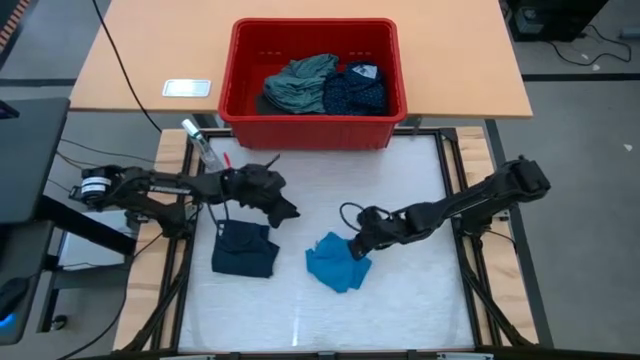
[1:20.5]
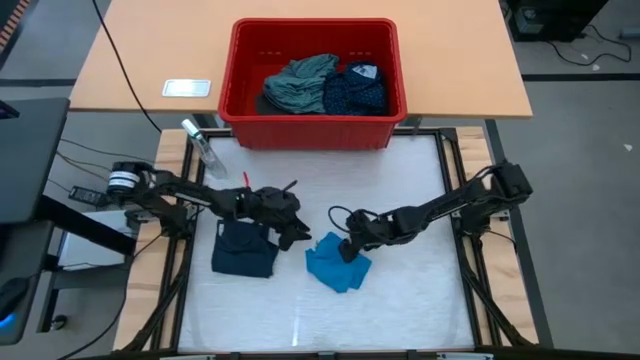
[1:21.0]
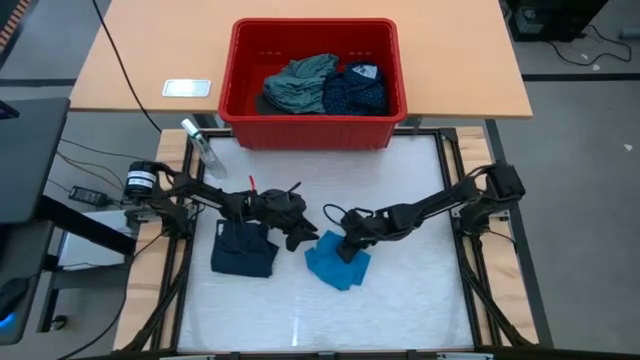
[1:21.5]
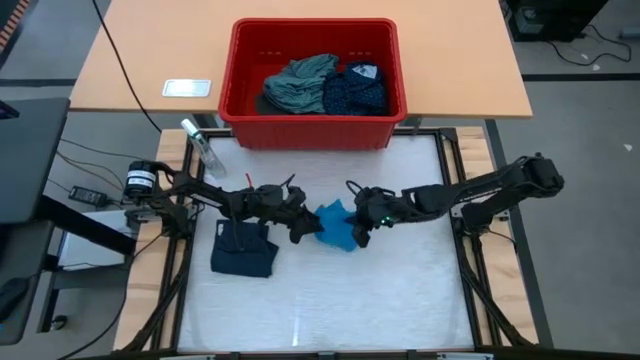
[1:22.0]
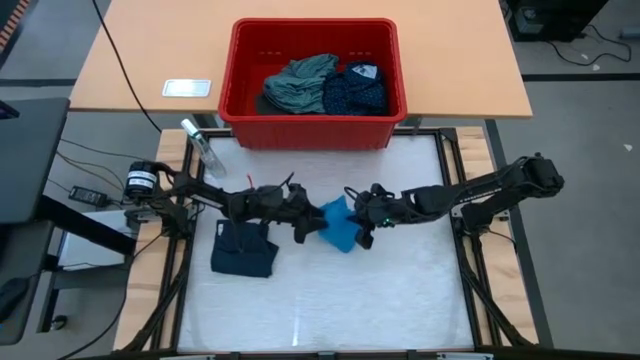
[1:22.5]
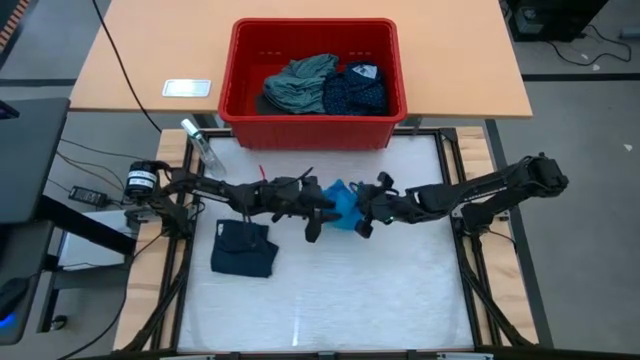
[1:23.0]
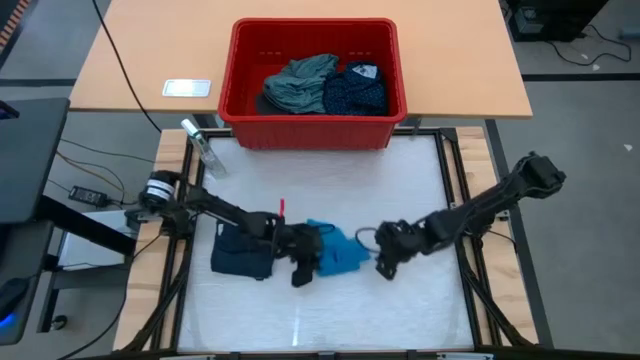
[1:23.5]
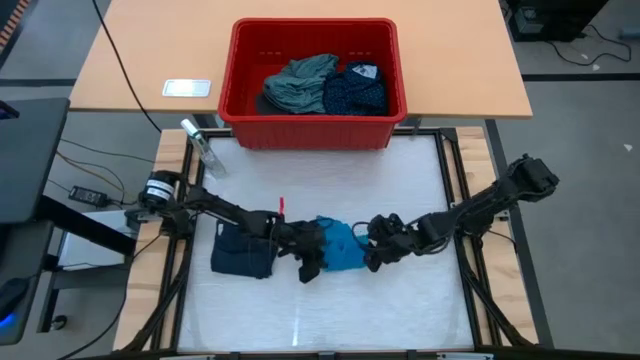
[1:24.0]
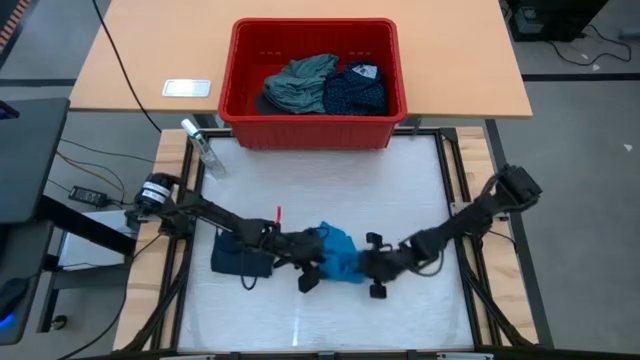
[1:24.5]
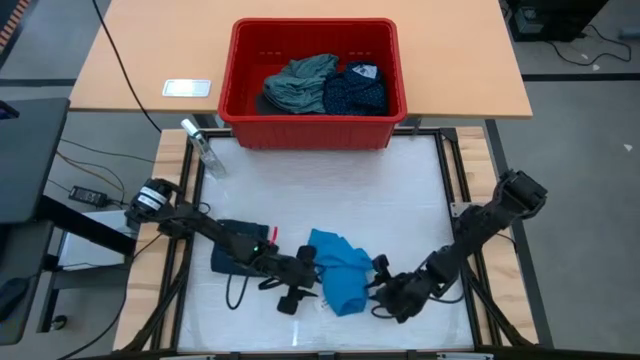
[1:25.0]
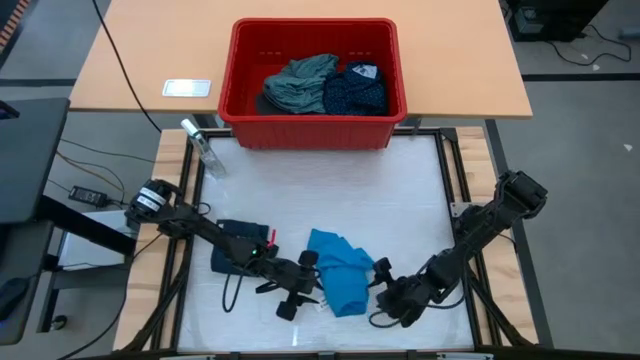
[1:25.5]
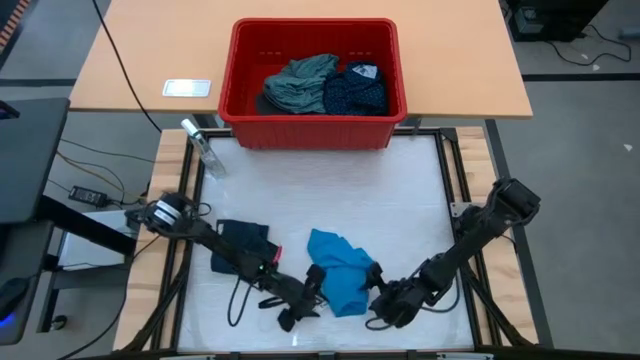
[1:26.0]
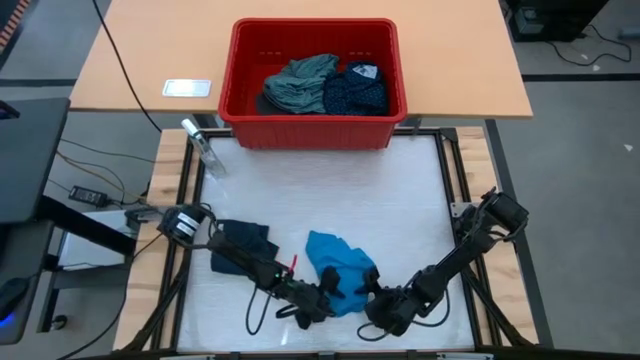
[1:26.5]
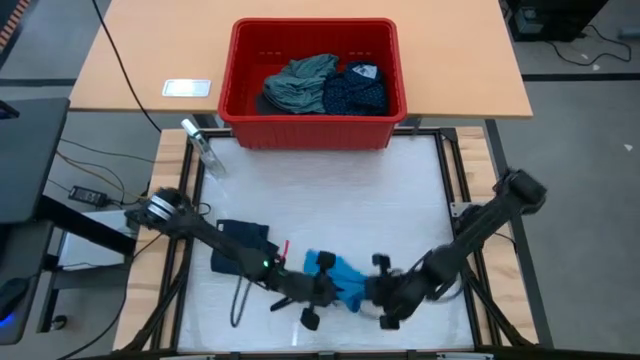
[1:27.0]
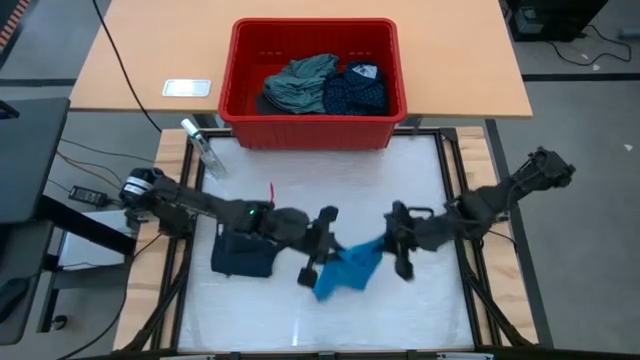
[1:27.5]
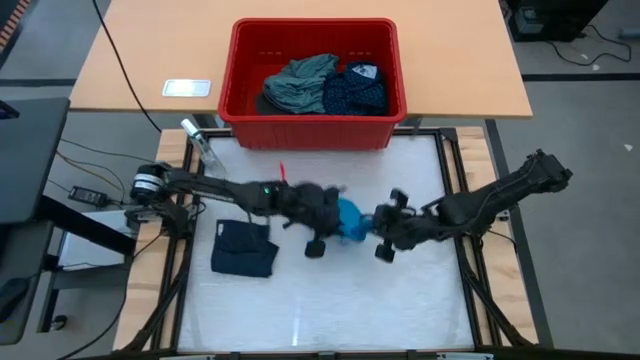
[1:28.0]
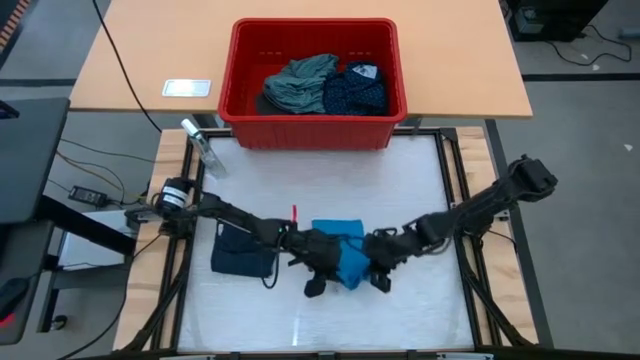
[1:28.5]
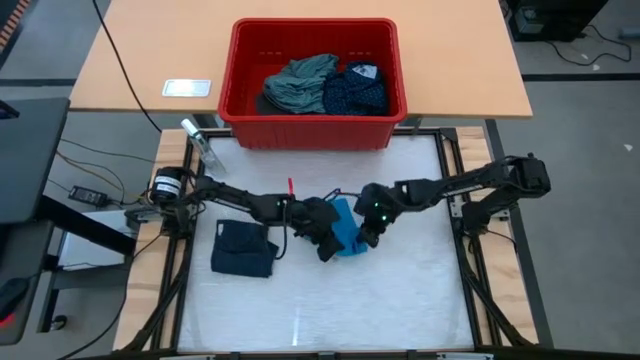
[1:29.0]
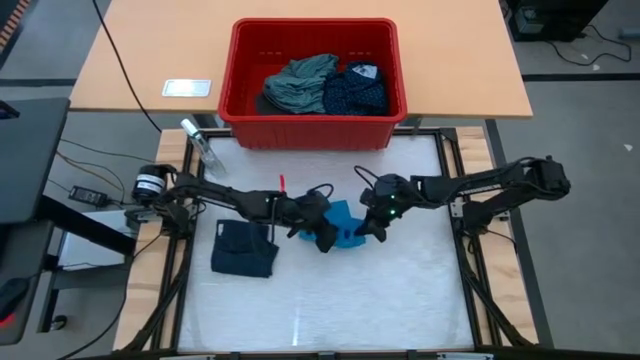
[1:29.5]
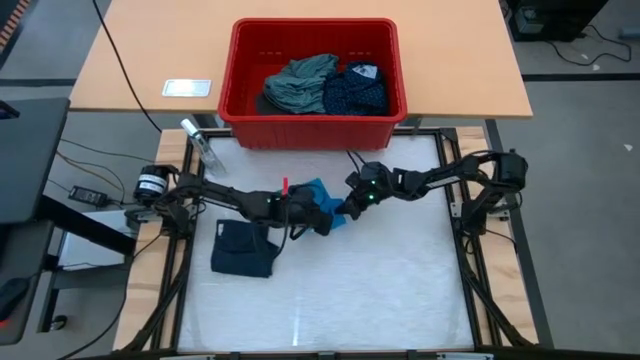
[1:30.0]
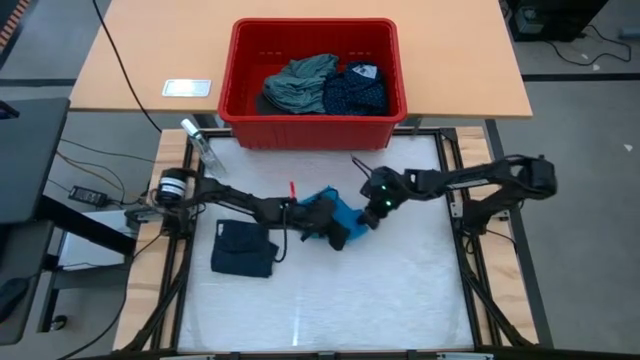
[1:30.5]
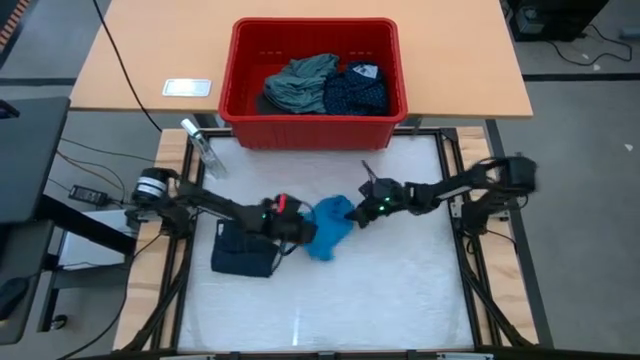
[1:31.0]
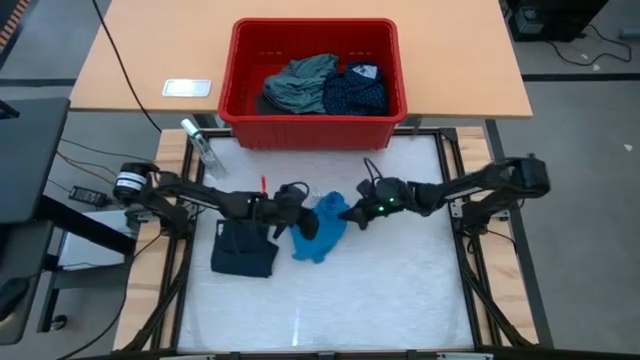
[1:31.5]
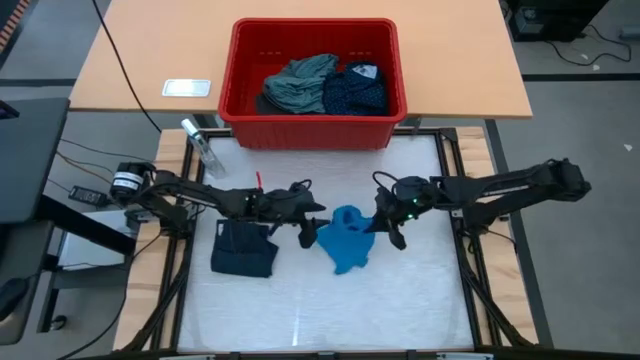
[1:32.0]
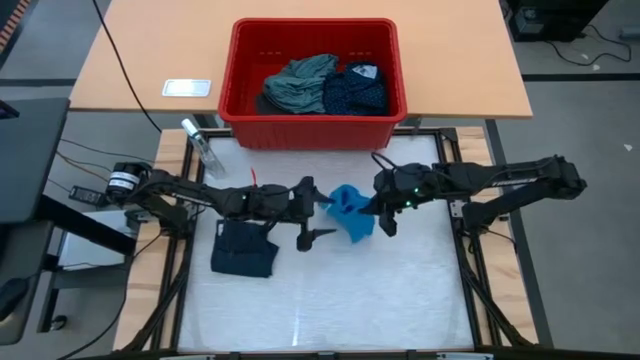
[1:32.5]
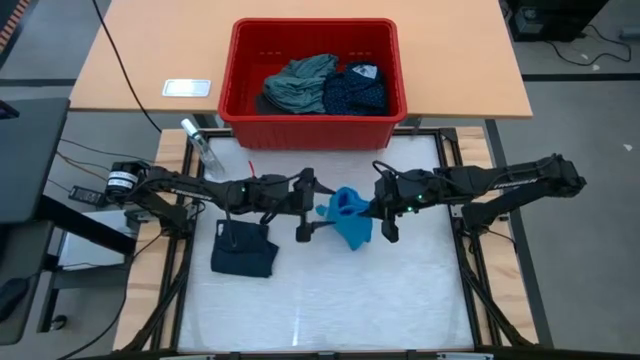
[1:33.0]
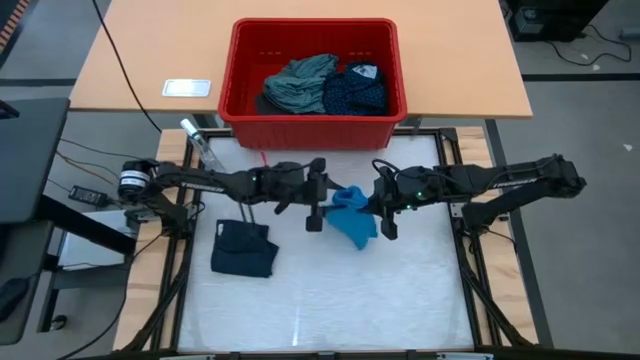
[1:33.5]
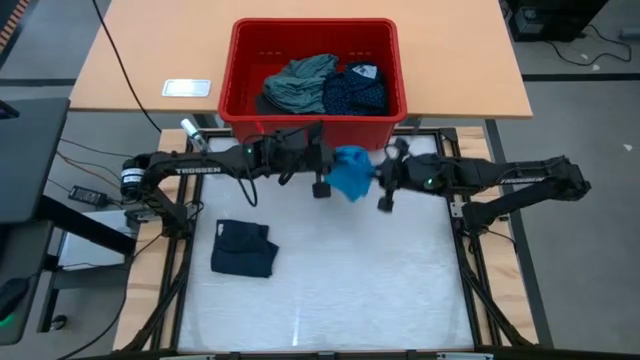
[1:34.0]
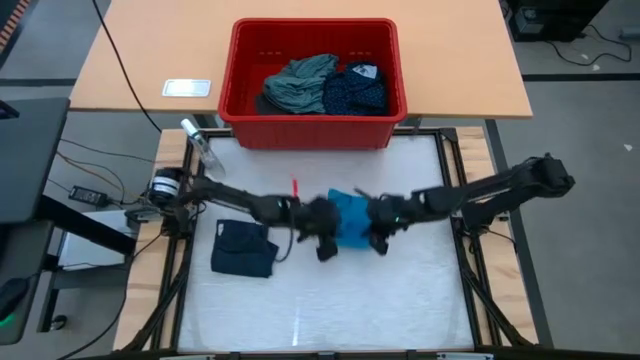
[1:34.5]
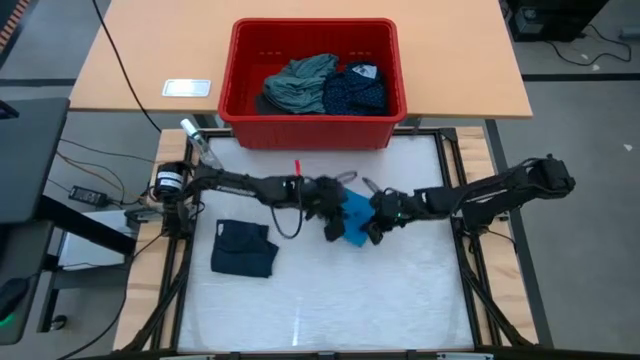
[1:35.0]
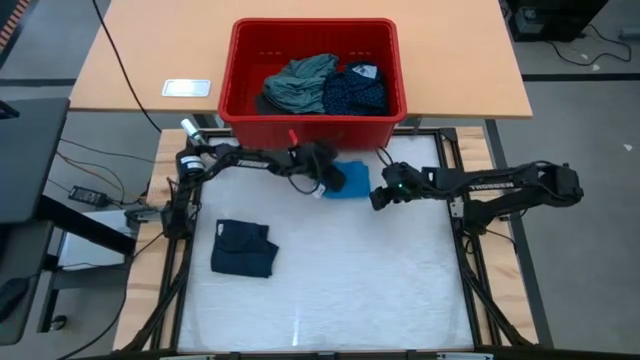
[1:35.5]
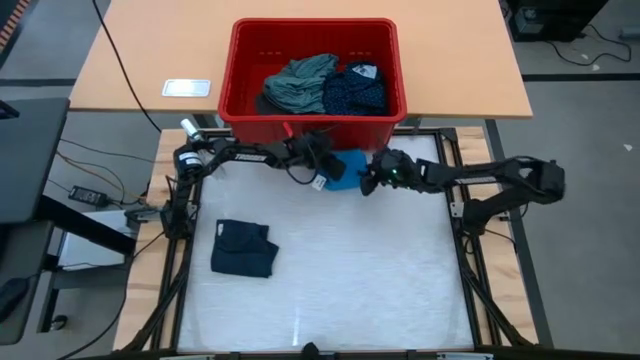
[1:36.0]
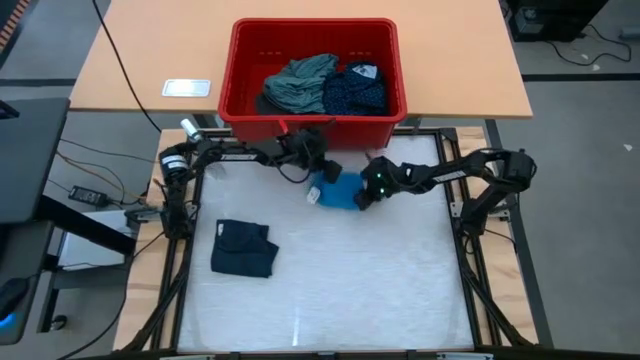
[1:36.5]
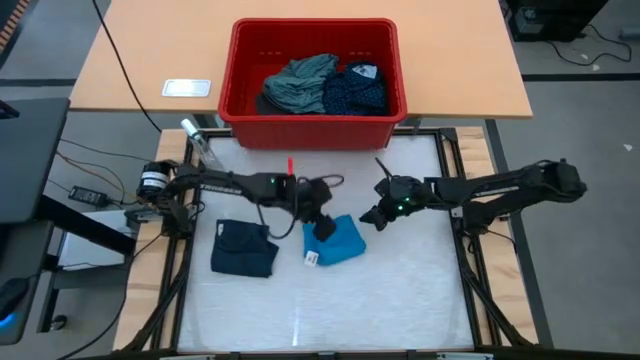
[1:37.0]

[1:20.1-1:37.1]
Task: Fold laundry
Fold the light blue shorts

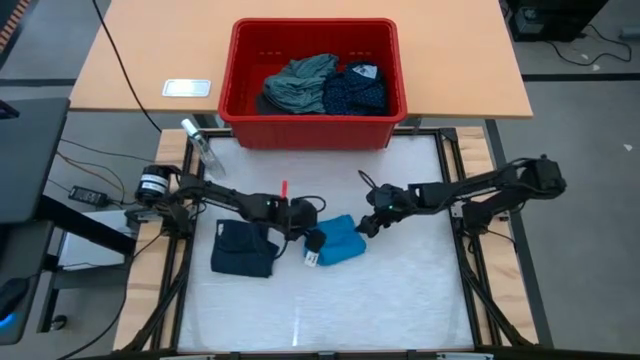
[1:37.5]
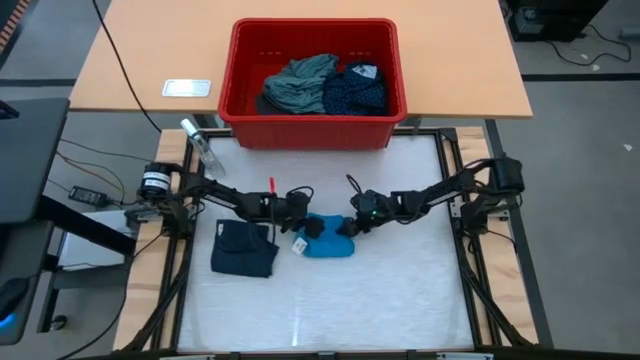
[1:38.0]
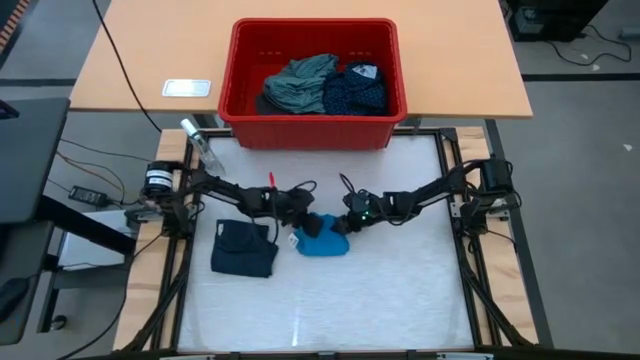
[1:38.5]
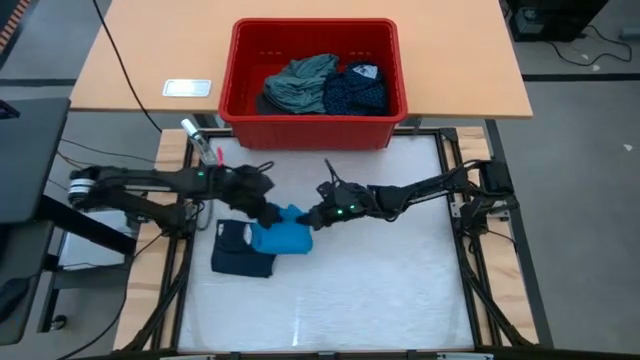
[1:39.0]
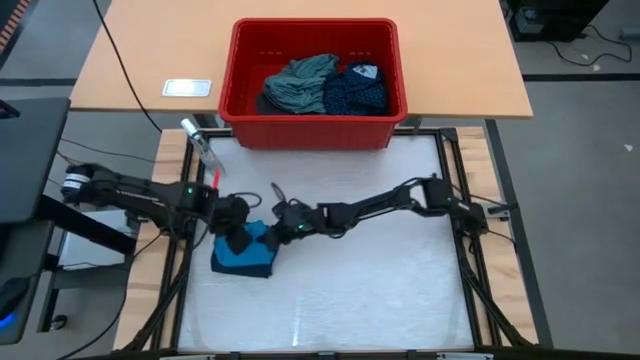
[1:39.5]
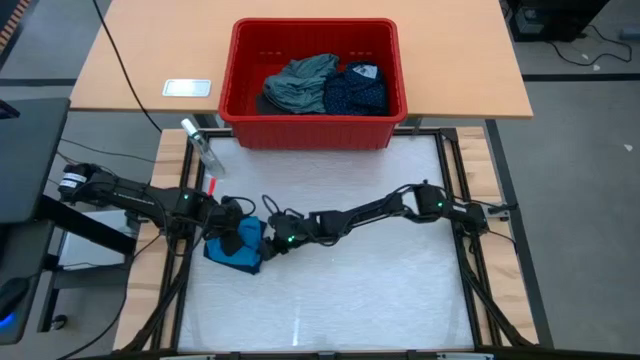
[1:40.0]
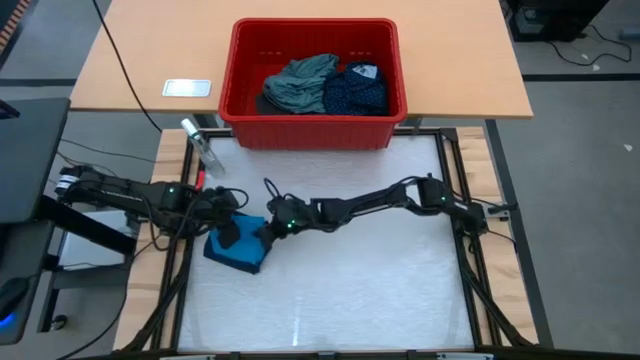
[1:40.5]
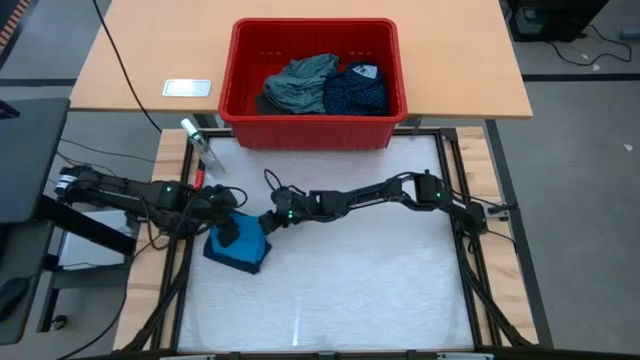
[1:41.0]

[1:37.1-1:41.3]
Stack the light blue shorts on top of the dark blue shorts
